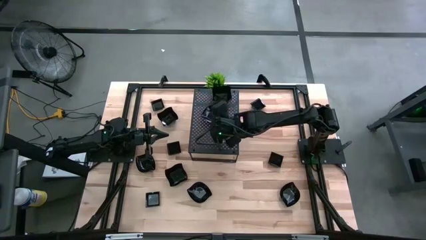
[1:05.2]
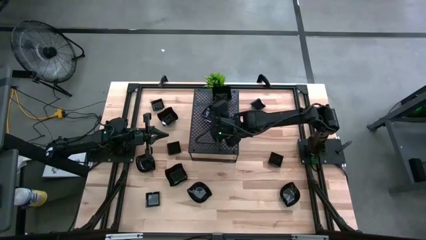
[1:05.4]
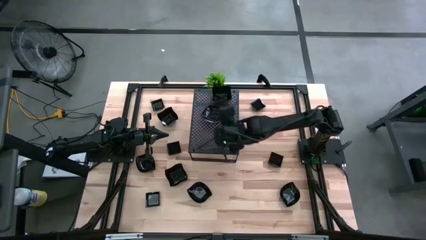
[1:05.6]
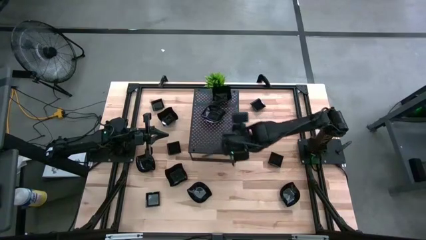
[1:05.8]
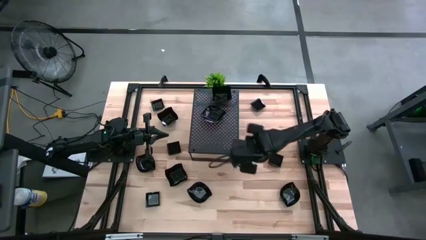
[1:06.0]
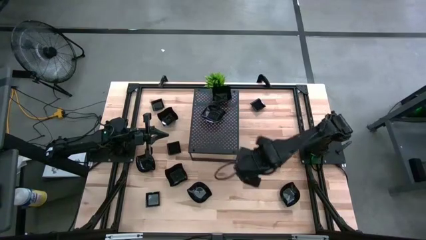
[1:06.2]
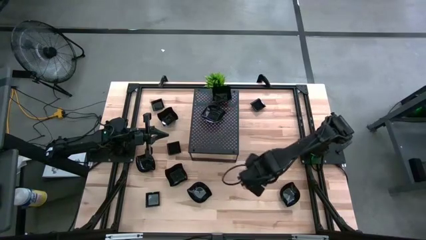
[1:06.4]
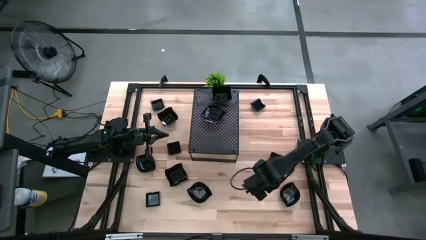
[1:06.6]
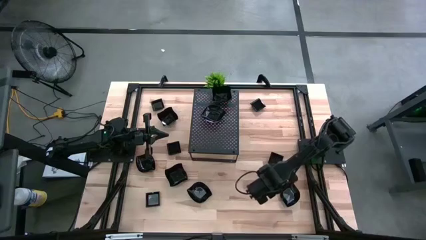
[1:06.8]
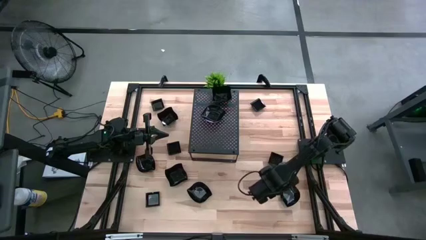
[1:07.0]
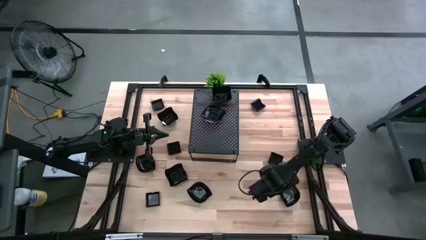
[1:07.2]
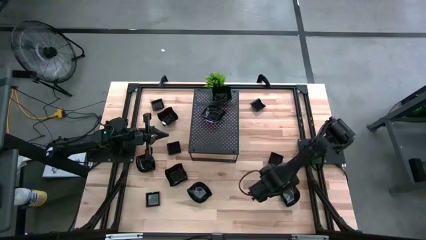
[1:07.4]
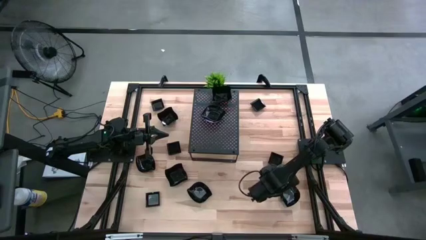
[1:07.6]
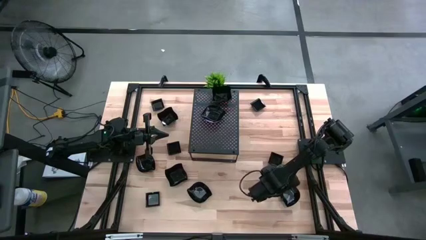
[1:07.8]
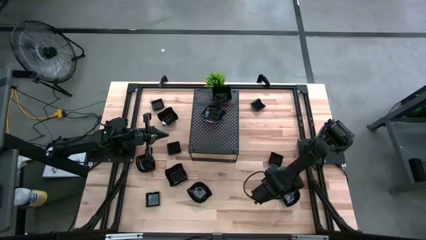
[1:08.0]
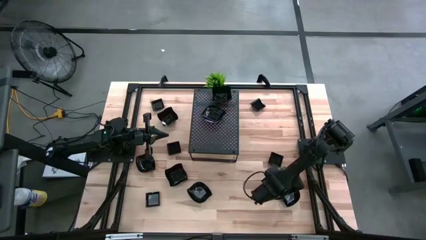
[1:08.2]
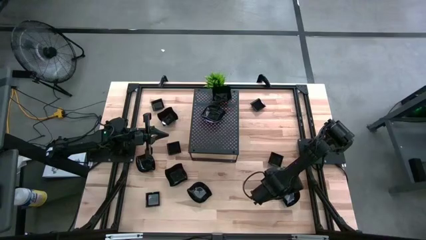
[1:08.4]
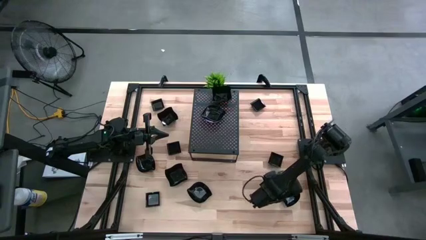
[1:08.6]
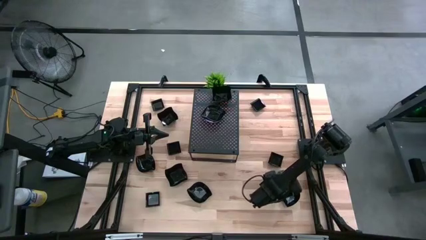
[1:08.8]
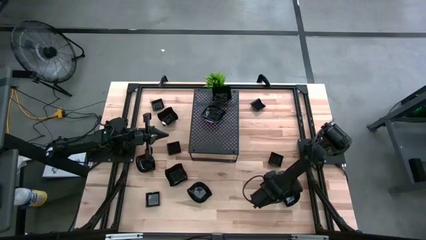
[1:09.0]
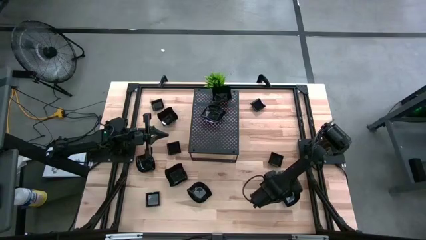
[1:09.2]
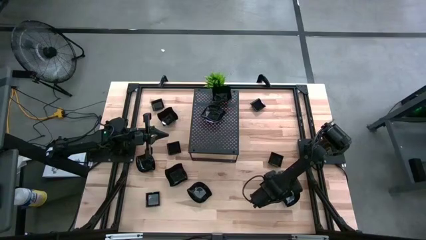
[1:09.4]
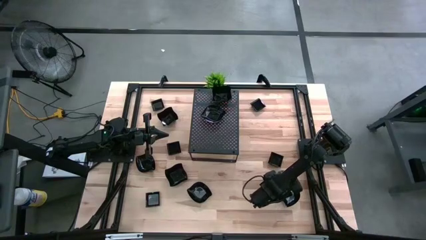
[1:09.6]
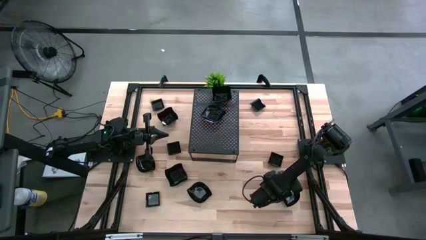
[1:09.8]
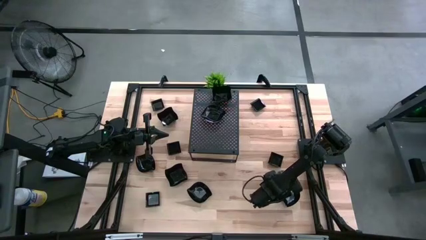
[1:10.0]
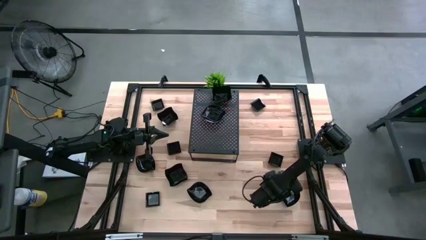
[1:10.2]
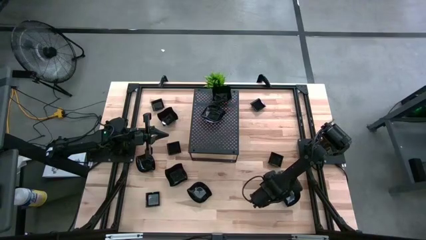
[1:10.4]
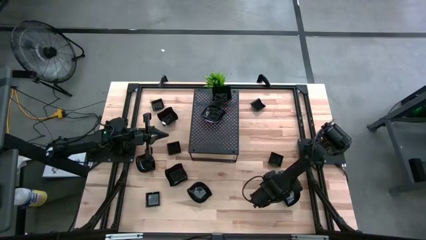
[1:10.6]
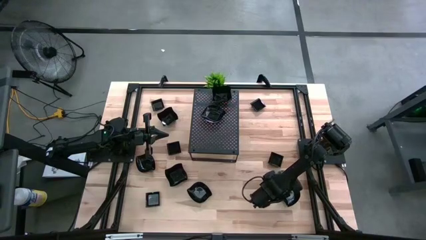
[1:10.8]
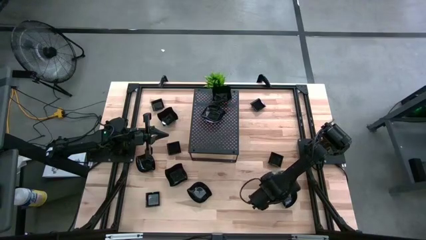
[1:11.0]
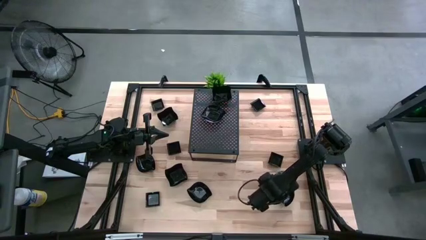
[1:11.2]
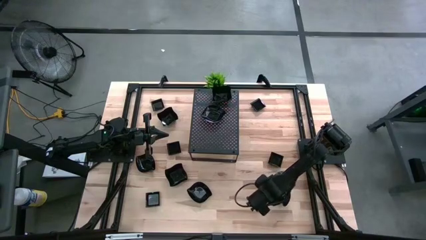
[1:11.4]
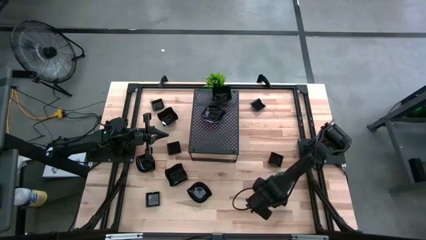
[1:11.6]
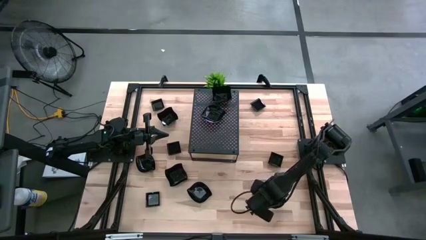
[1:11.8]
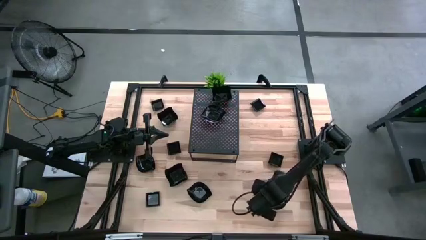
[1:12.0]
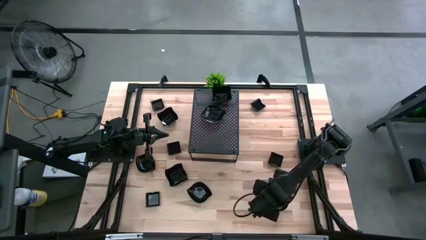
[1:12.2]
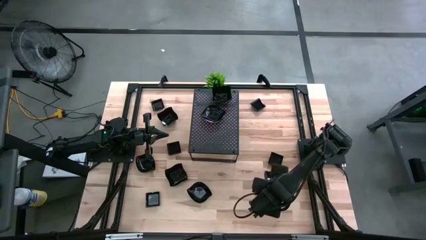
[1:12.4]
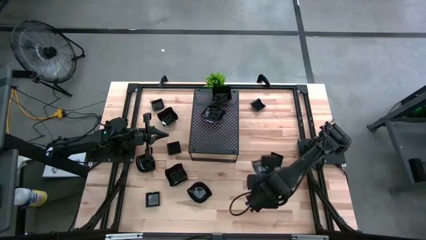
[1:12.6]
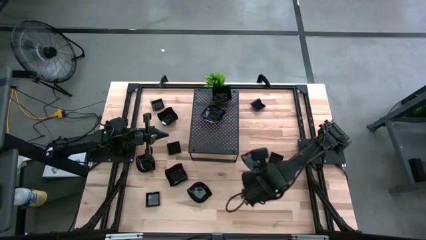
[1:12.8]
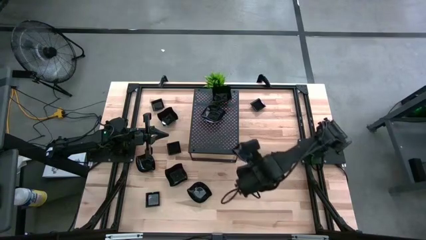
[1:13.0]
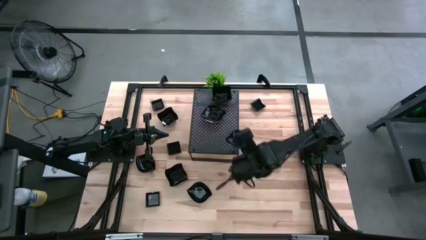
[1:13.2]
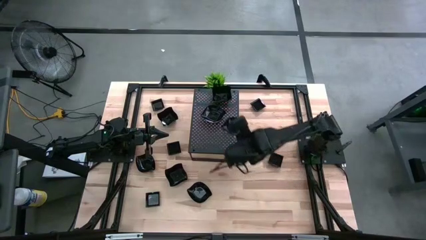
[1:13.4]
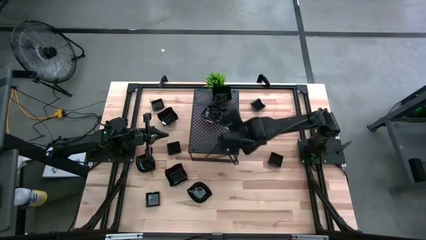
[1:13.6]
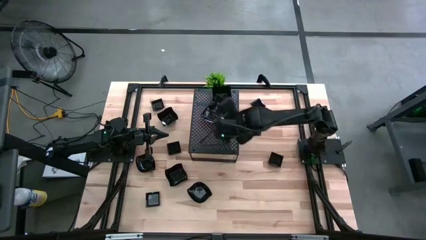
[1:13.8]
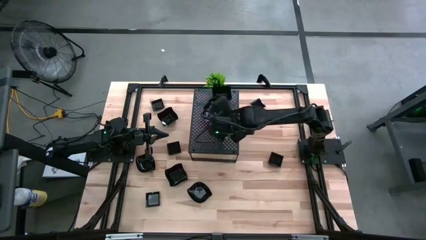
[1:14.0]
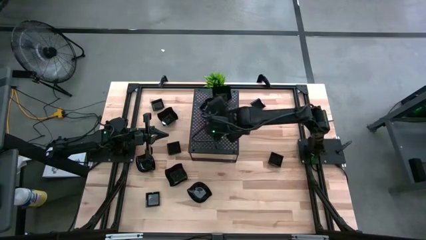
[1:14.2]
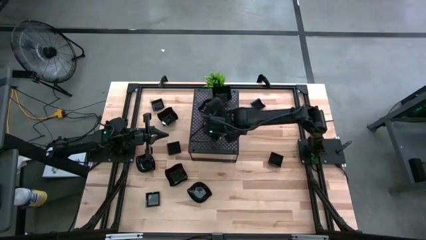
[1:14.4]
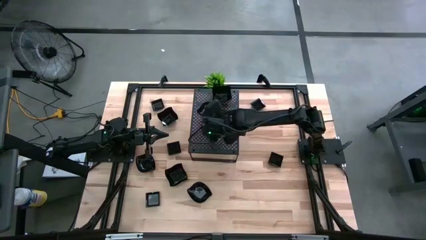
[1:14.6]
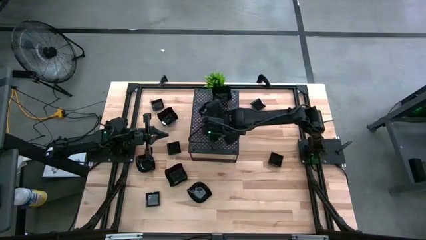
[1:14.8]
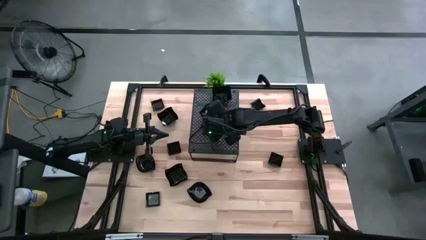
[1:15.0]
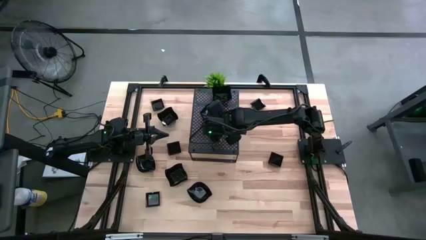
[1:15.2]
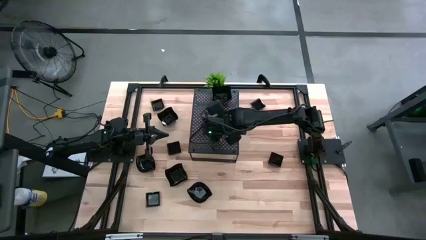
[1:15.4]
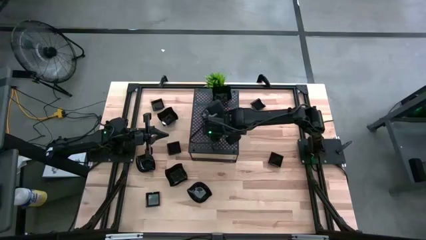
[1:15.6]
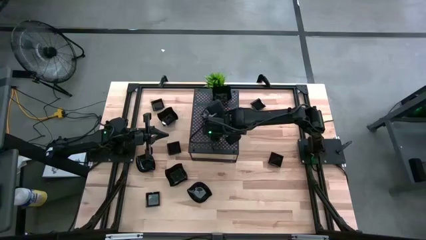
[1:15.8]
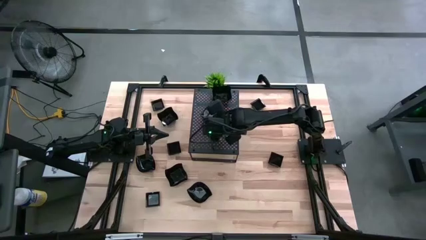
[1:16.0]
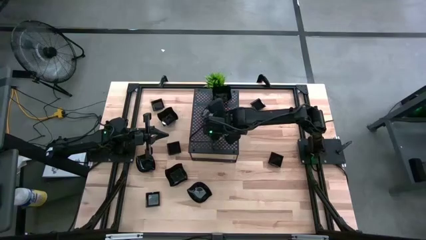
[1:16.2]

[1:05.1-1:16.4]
Task: Pick & Place Mini shaped plates
Stack the leaf shaped plate on top of the leaf shaped plate on the shelf

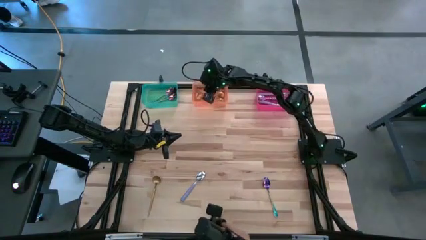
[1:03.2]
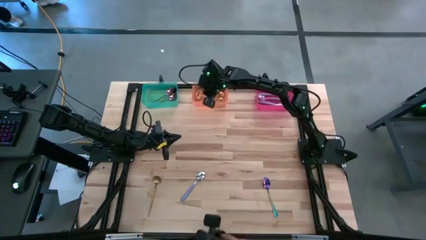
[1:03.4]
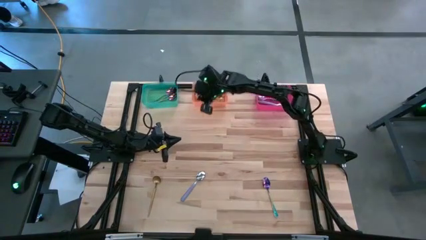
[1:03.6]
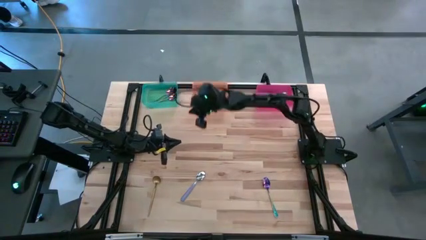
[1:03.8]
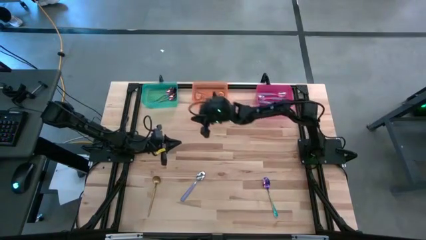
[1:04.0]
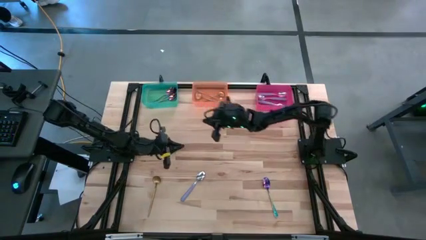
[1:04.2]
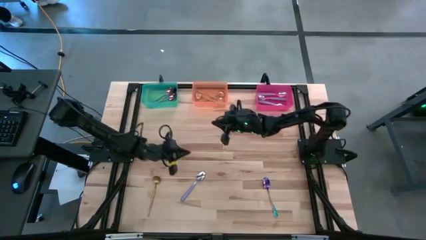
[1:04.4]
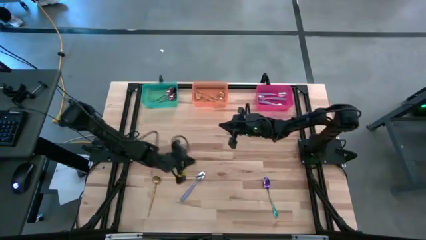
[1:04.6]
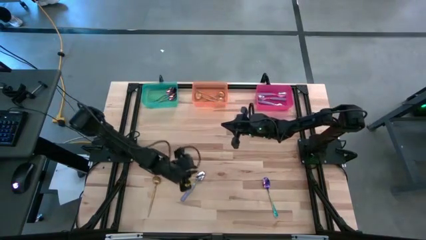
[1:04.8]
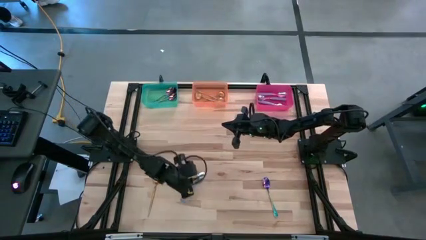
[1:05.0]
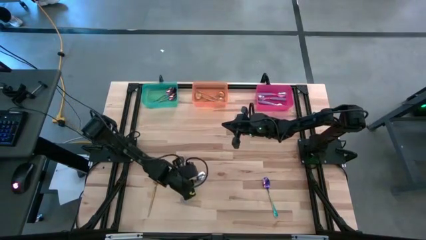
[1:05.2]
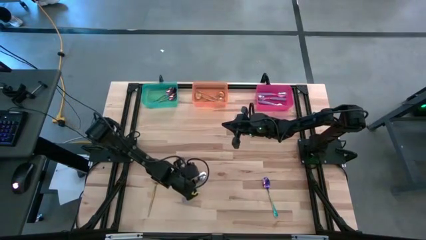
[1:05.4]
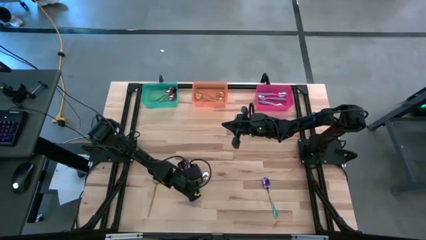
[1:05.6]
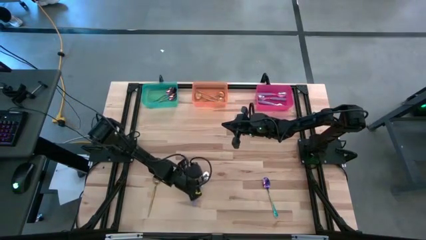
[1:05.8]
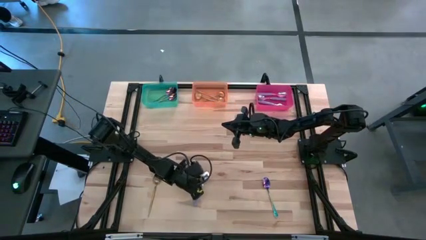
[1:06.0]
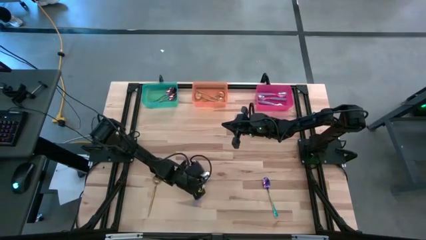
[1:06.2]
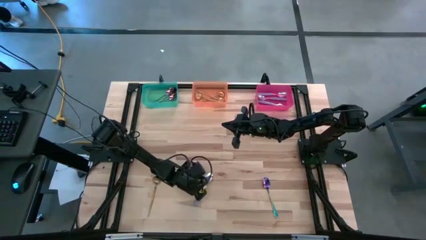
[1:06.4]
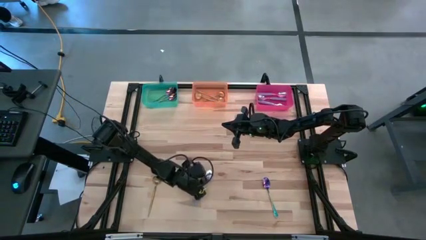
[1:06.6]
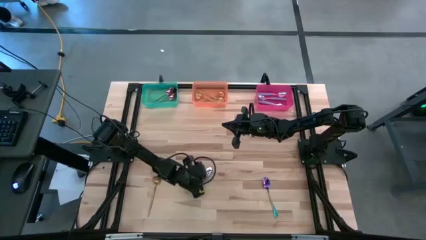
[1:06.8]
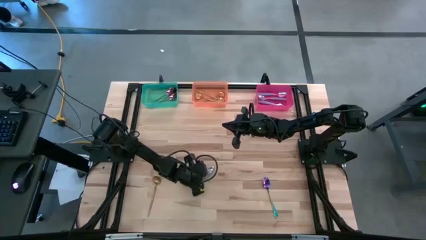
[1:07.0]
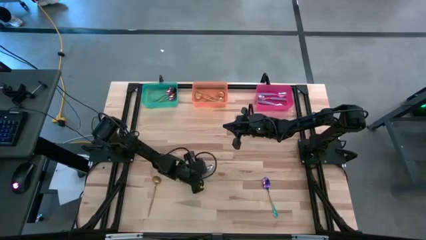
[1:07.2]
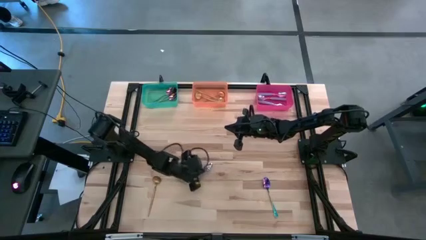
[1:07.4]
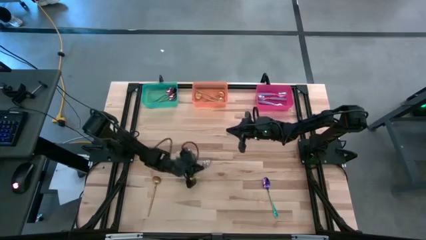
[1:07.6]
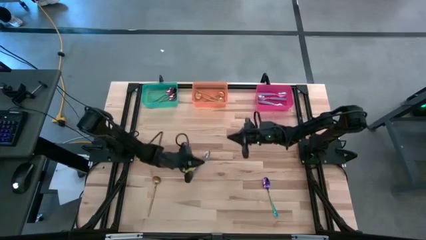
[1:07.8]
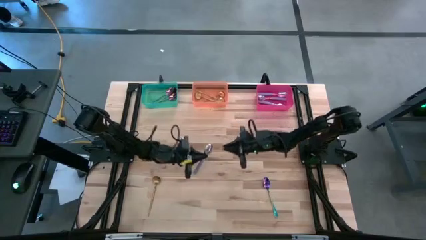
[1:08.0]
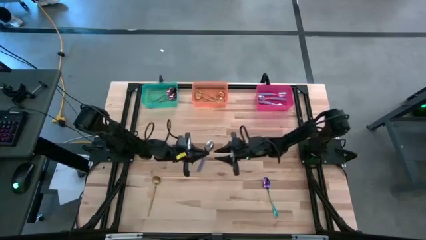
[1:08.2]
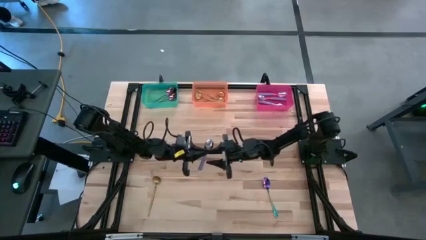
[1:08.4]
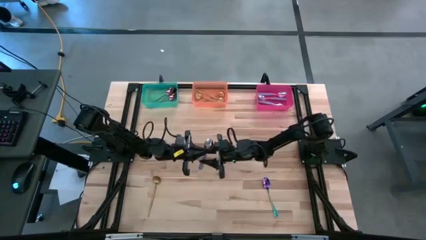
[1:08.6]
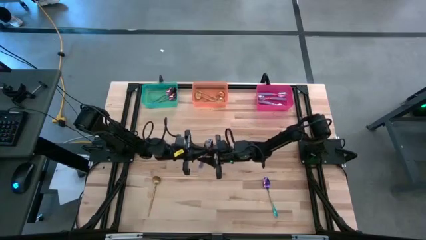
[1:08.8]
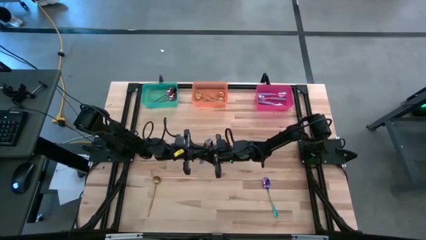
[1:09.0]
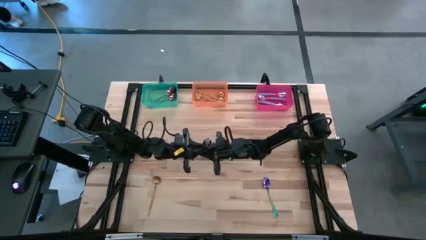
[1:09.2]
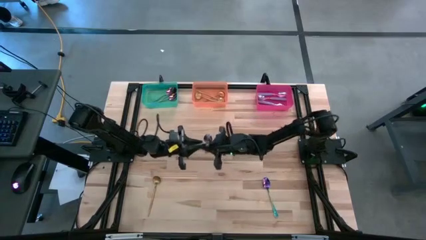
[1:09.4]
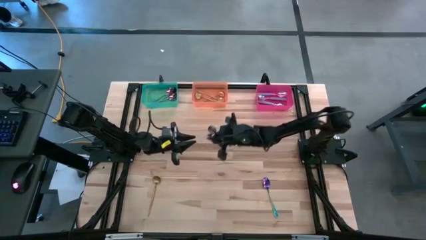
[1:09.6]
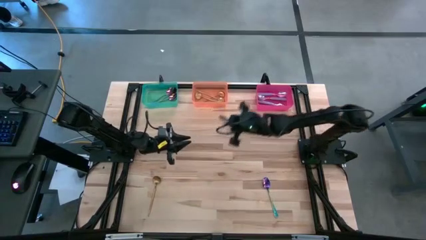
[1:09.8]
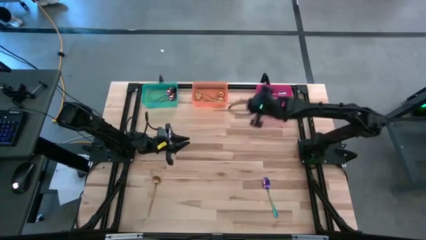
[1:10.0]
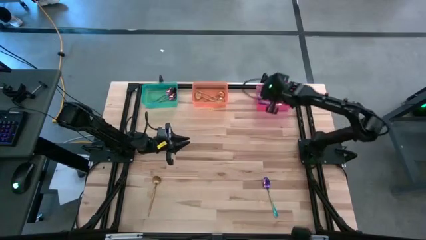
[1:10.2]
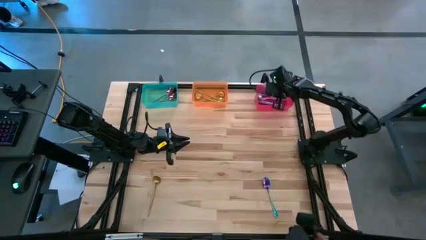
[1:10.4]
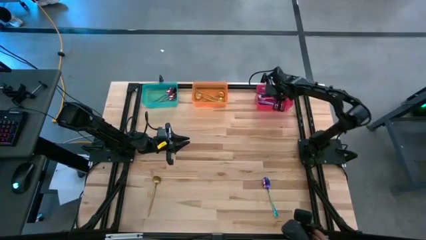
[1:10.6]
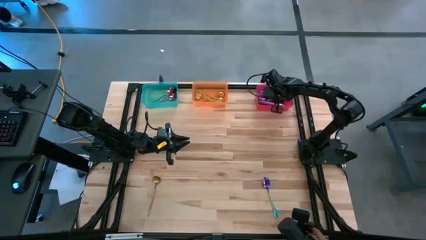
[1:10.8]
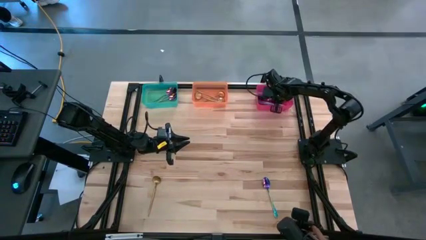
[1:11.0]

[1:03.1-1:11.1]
Task: Sort silverware by color (type)
Put the purple spoon into the red bin
